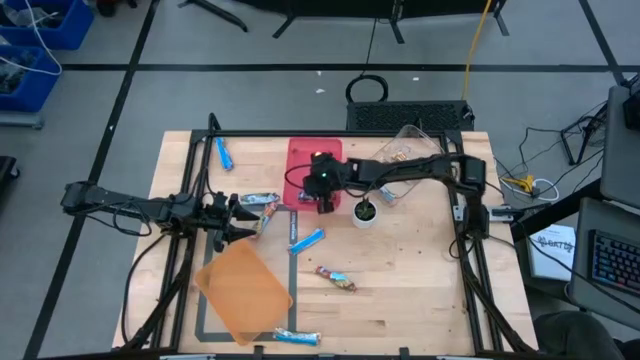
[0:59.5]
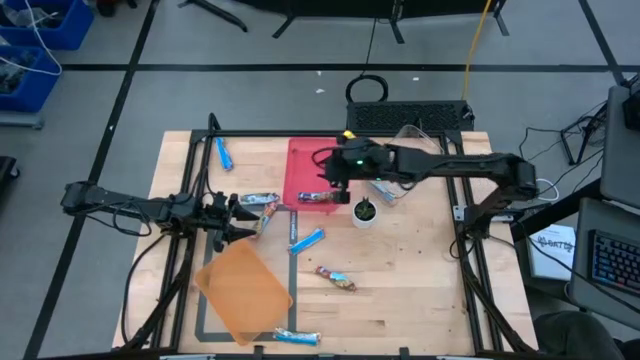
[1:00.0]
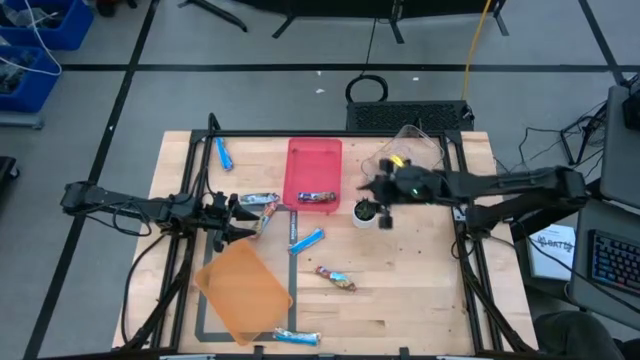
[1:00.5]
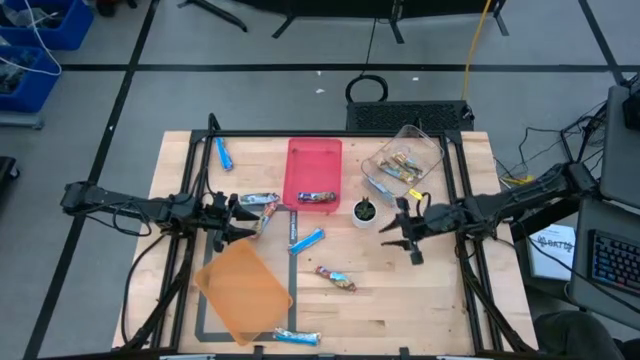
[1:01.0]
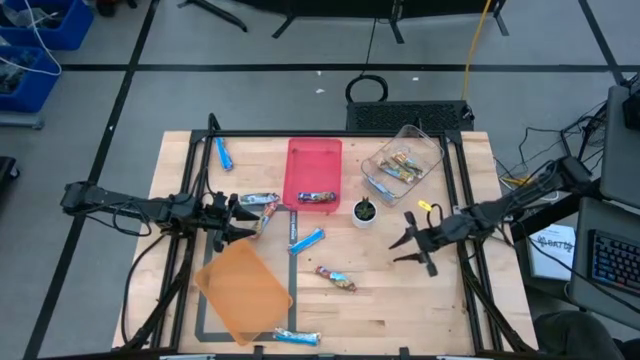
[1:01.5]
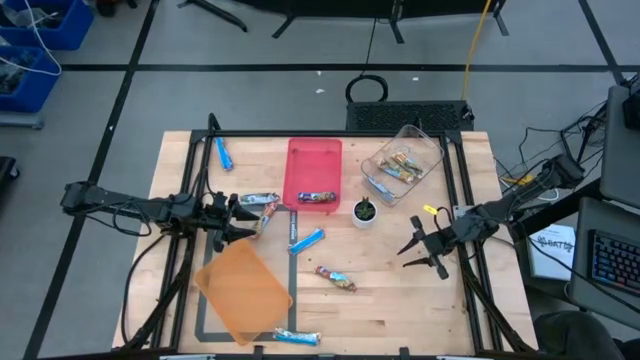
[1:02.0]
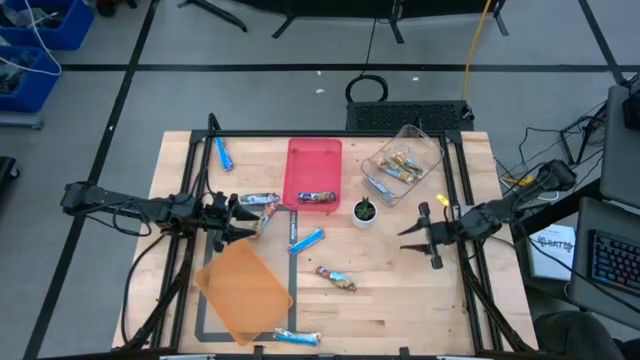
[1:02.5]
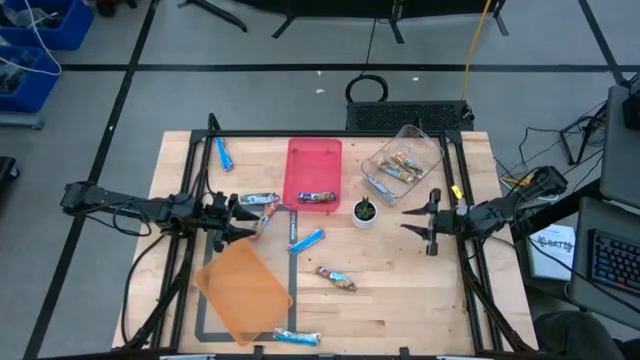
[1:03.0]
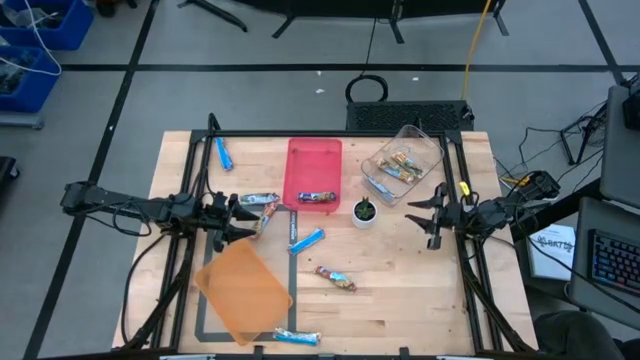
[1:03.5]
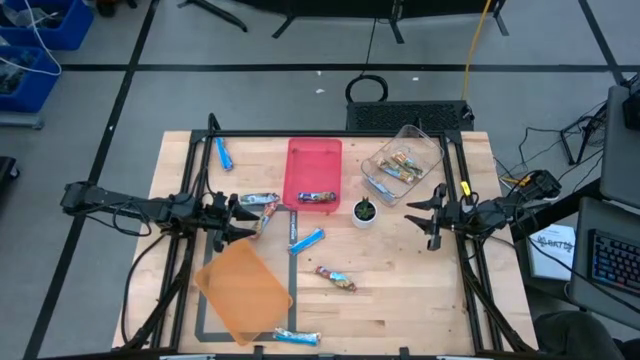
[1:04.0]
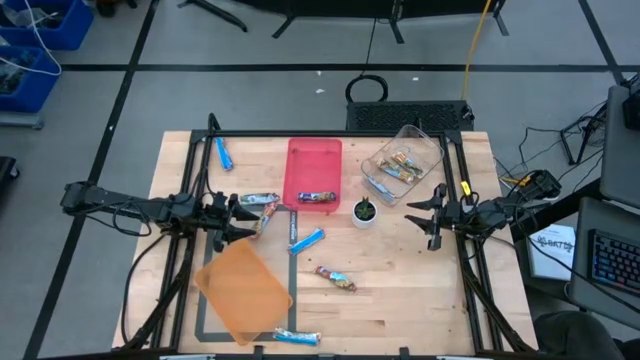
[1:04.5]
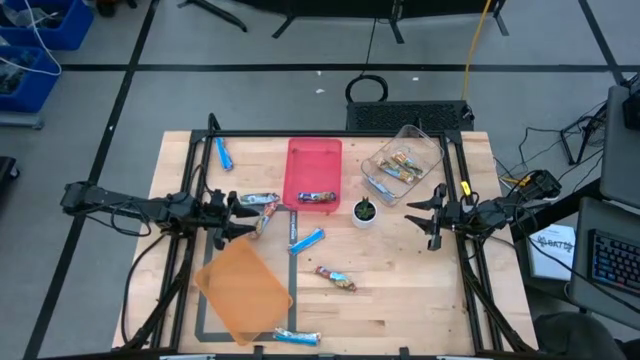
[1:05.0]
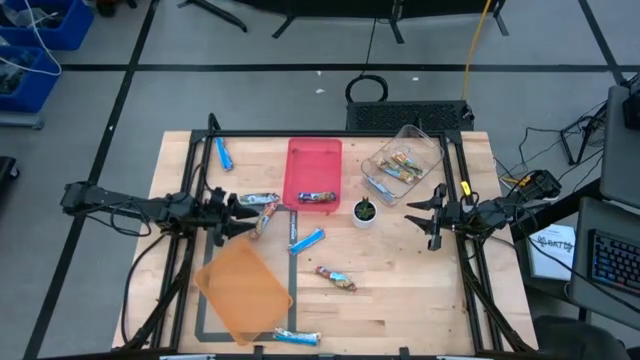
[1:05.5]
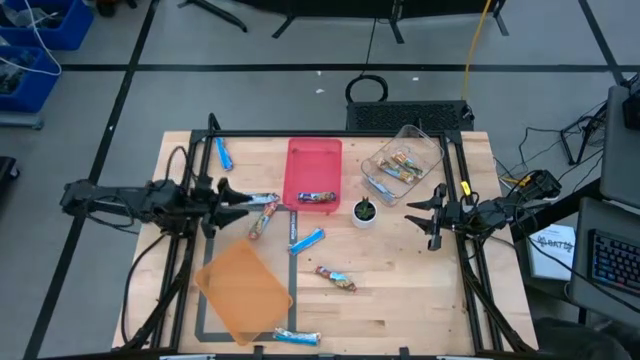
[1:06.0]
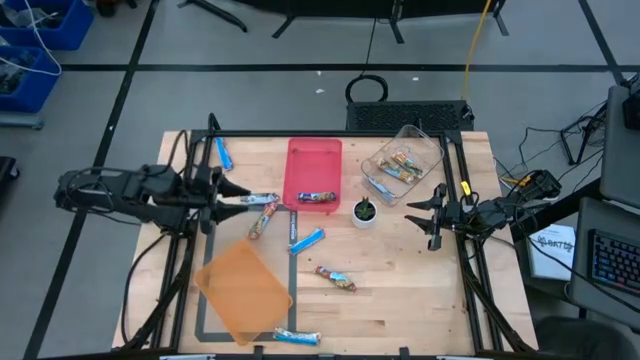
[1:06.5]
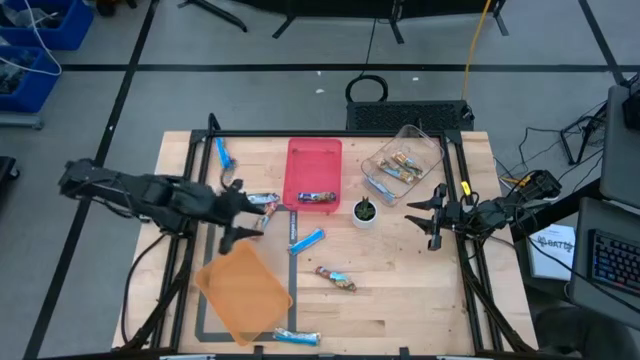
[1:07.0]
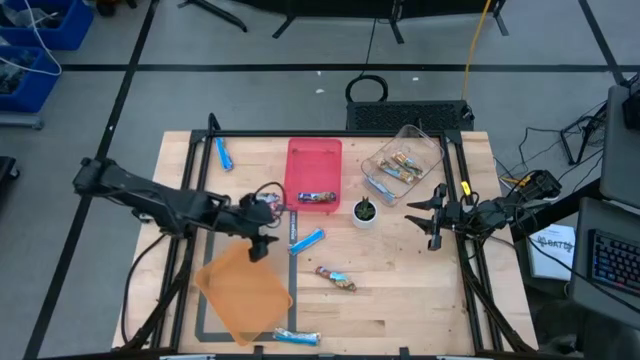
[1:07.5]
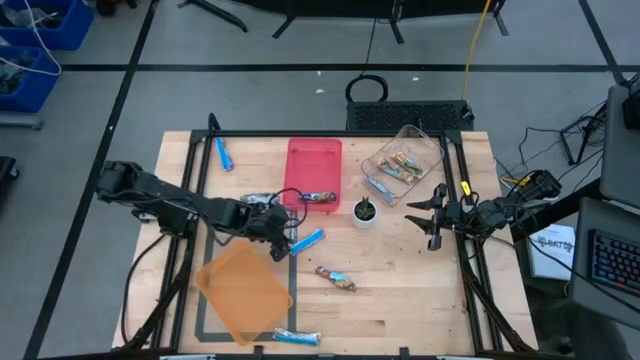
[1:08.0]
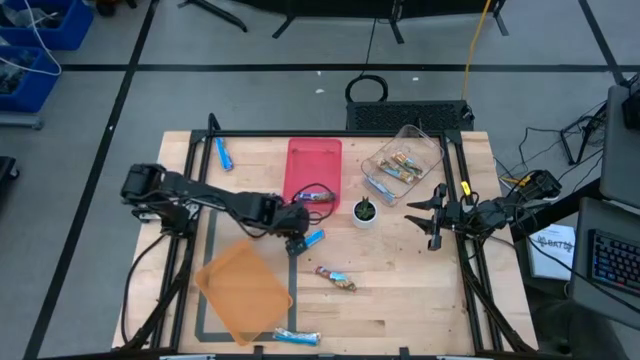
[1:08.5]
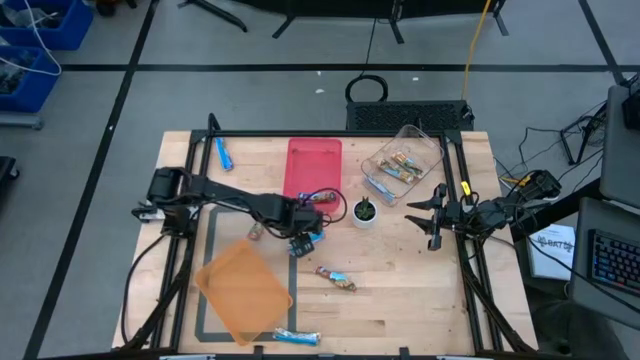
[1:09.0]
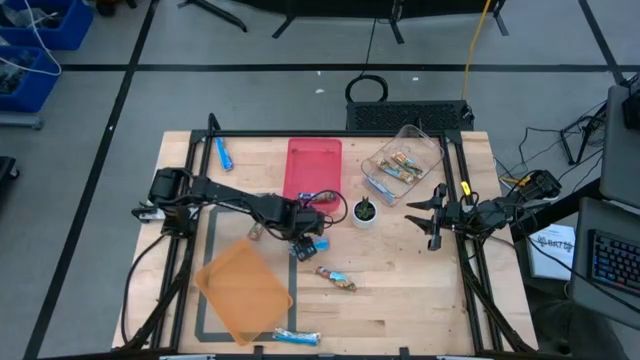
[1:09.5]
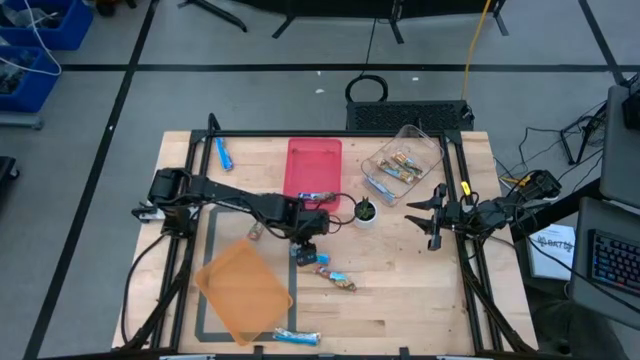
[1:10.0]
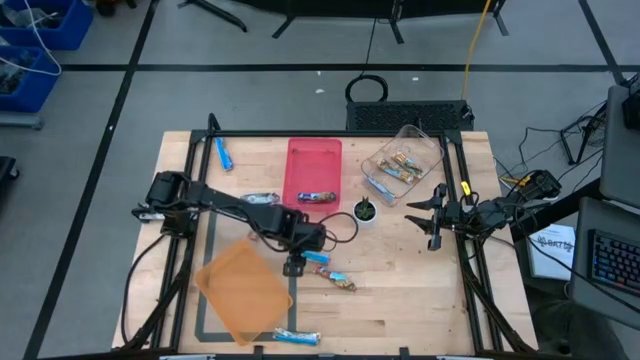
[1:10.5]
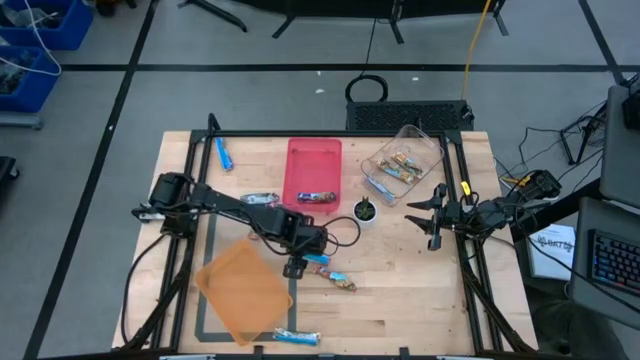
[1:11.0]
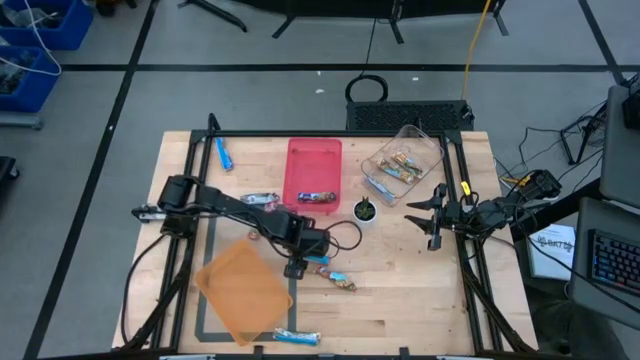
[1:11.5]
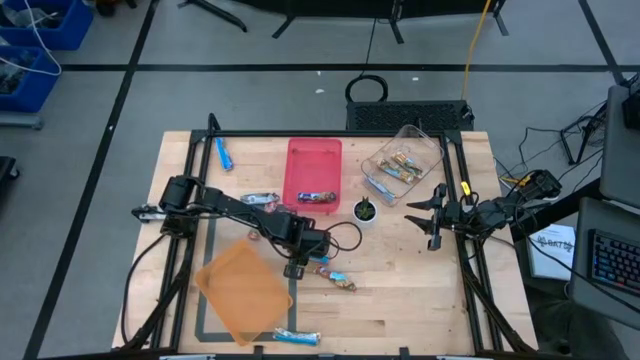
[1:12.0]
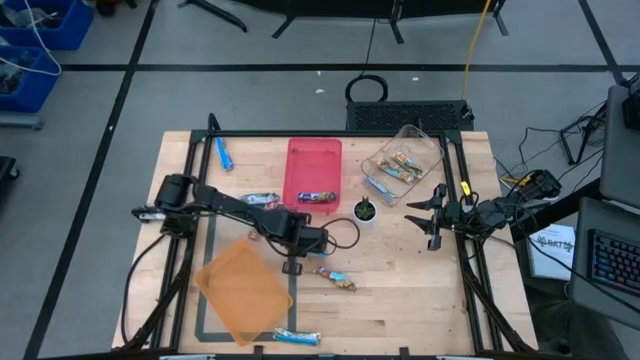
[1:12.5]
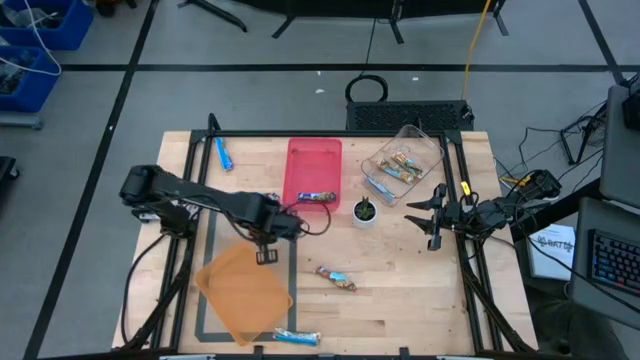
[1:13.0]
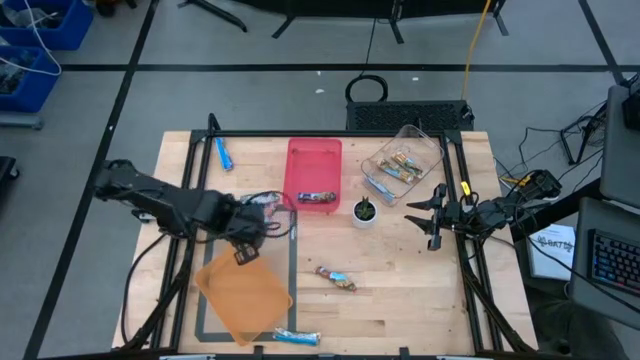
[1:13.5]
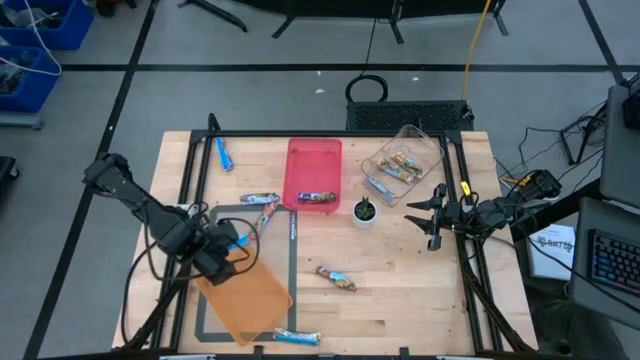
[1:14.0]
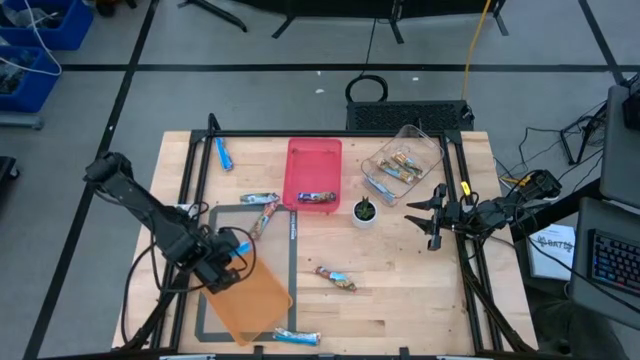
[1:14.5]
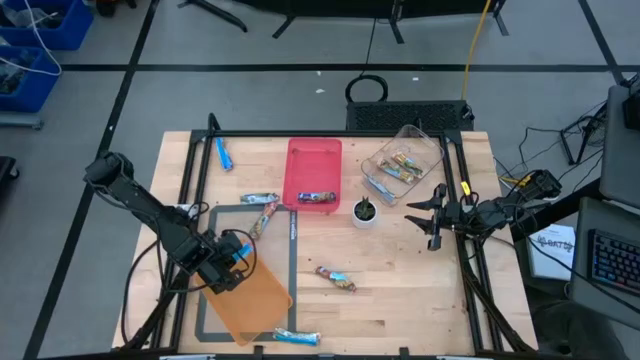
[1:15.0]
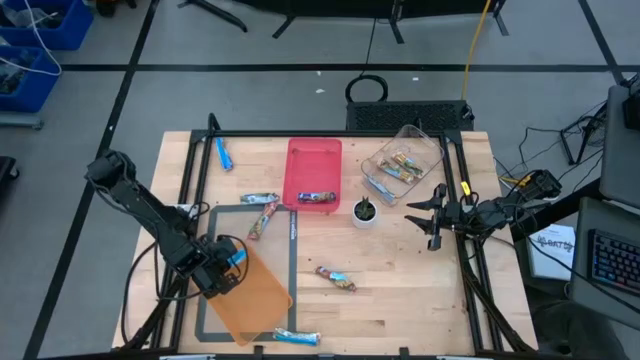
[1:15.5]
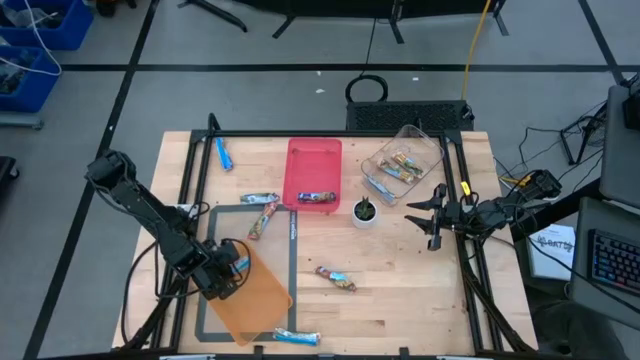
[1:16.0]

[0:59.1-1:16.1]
Task: Pick and place Granola Bars by type
Put the red granola bar into the orange bin

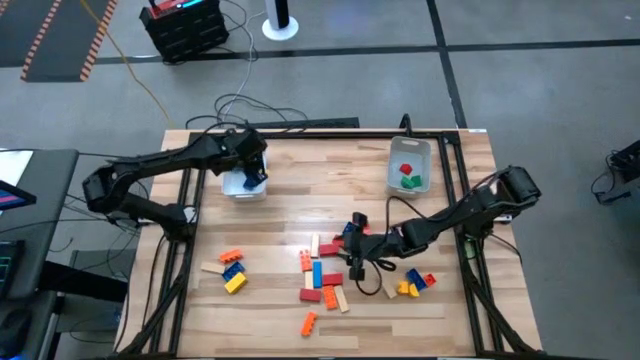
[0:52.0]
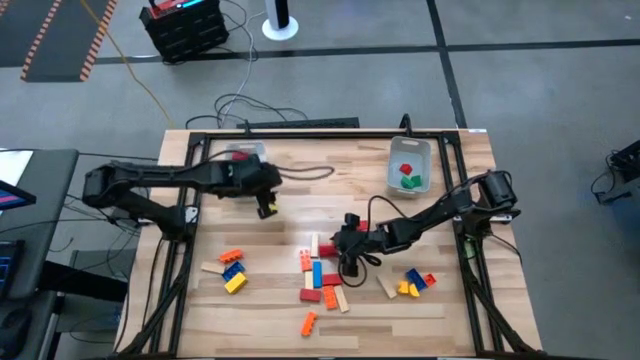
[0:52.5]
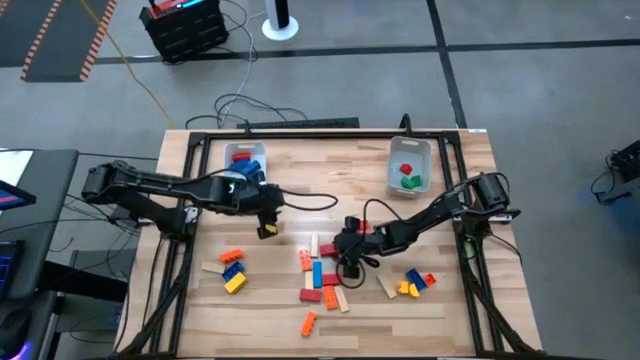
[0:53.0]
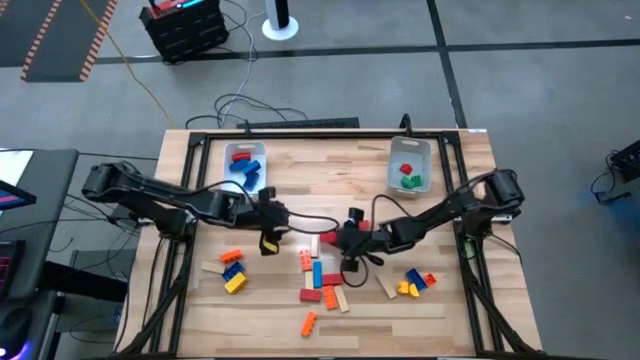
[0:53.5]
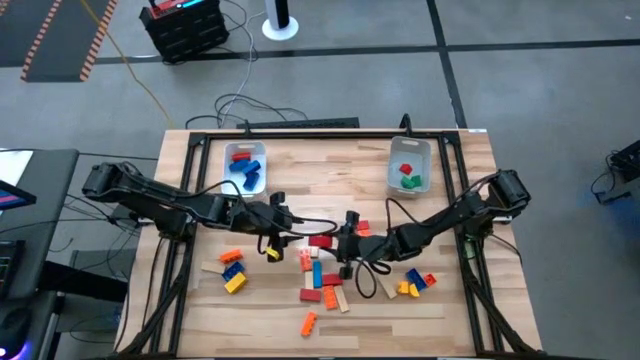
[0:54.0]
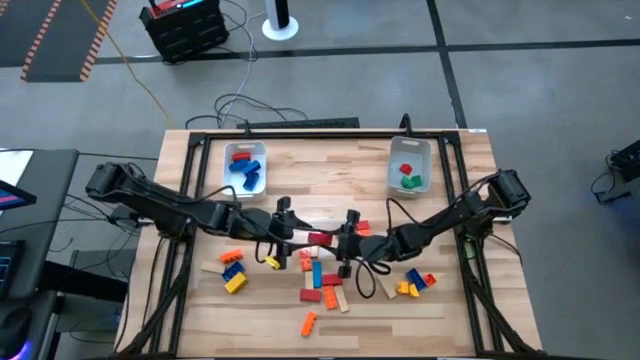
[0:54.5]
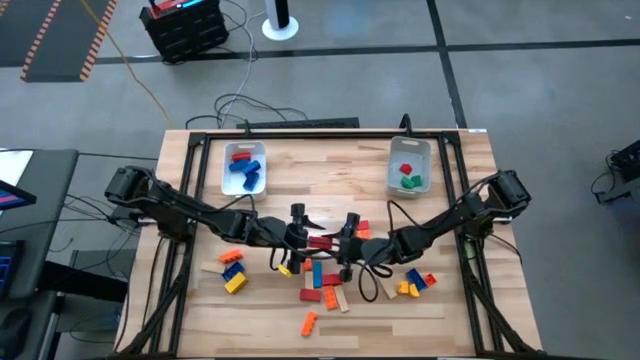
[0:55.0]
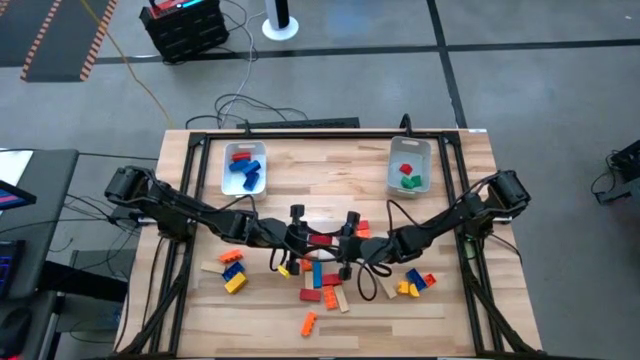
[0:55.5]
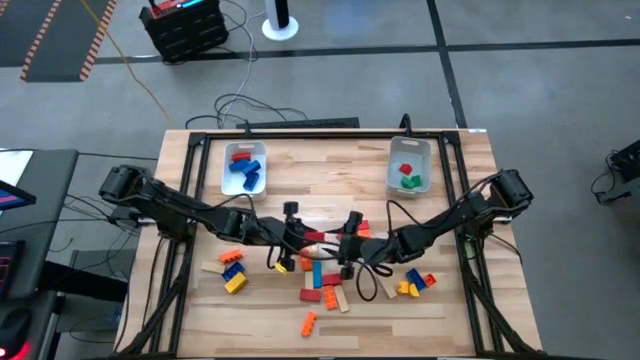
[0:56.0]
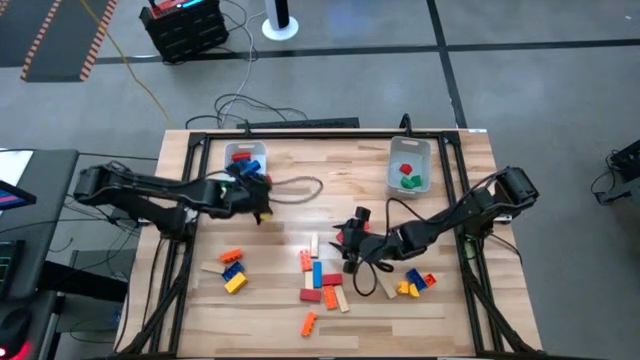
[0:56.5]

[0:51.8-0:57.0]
Task: Sort blocks by size
Put the large red block into the white bin
